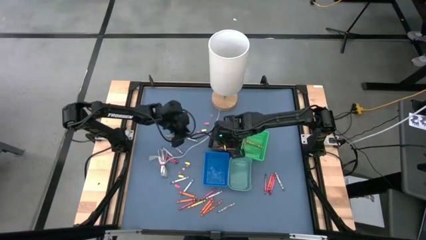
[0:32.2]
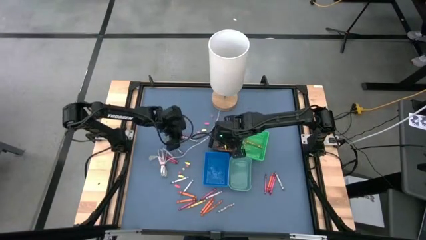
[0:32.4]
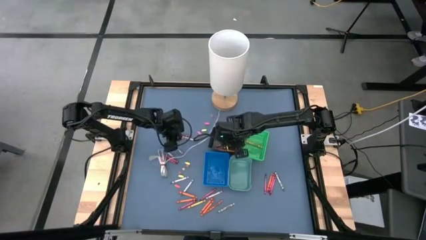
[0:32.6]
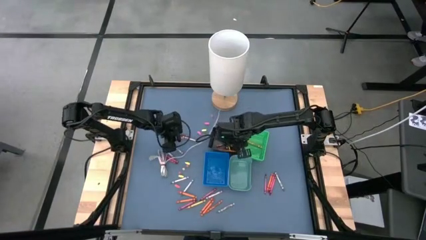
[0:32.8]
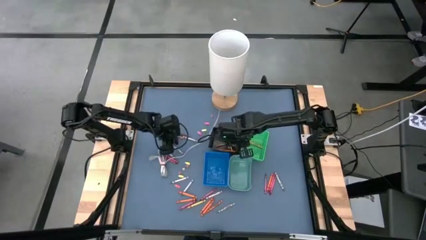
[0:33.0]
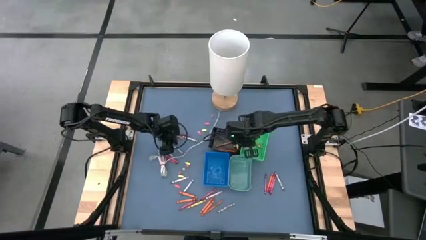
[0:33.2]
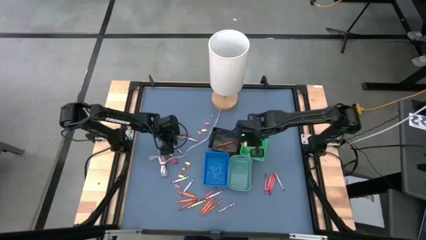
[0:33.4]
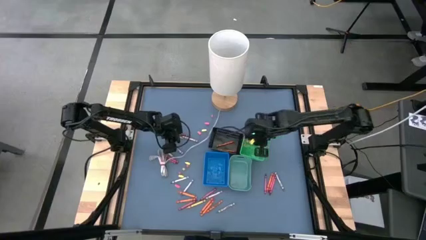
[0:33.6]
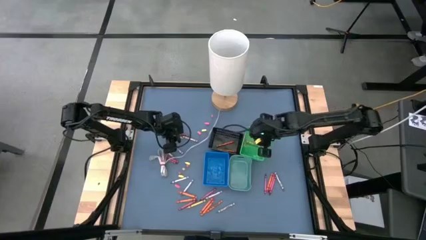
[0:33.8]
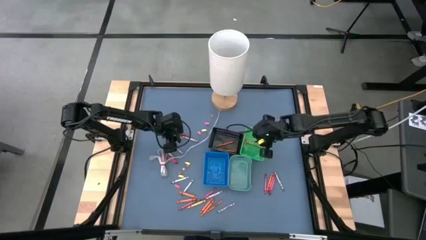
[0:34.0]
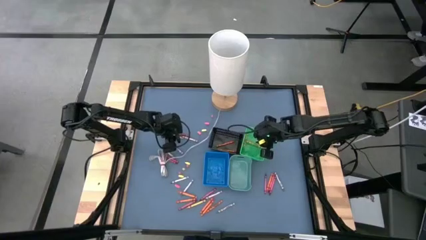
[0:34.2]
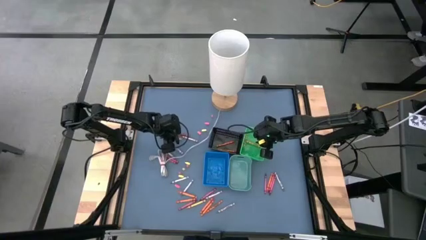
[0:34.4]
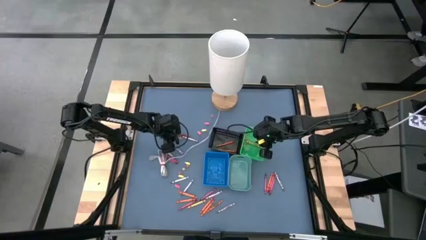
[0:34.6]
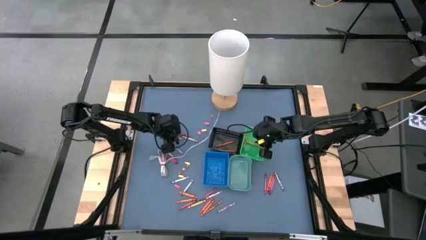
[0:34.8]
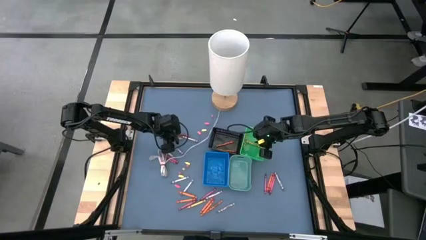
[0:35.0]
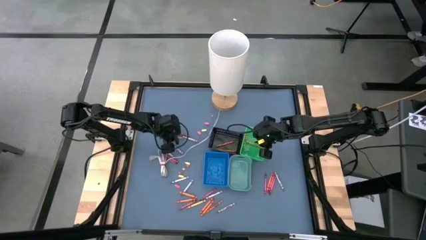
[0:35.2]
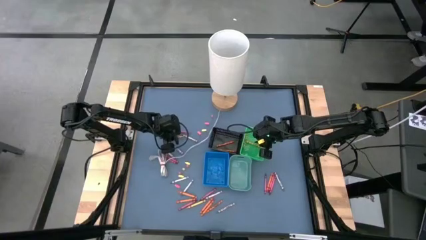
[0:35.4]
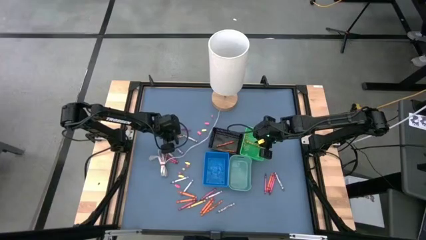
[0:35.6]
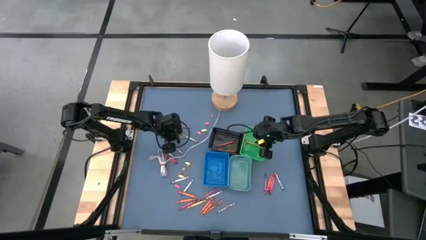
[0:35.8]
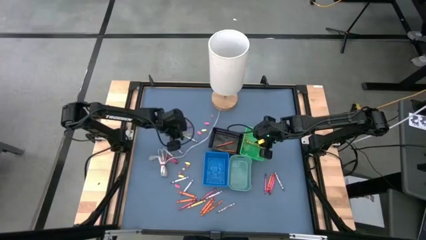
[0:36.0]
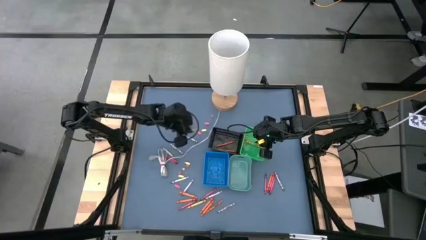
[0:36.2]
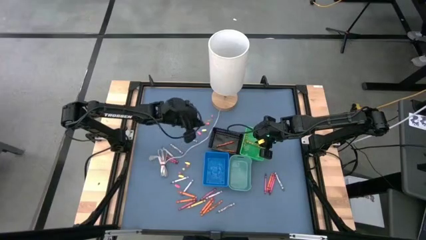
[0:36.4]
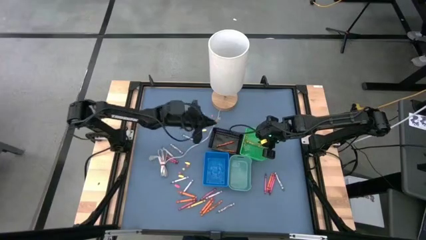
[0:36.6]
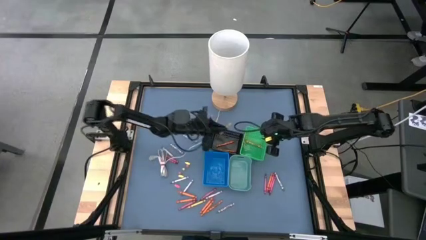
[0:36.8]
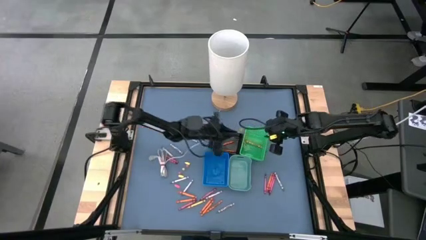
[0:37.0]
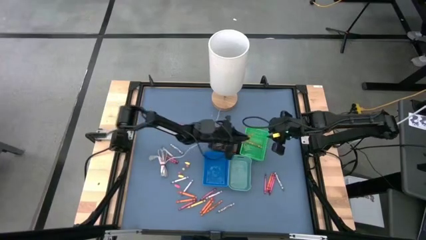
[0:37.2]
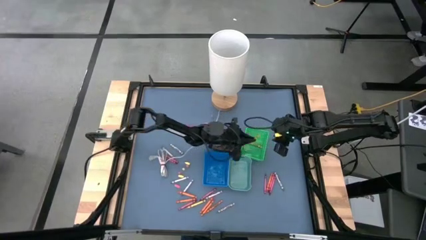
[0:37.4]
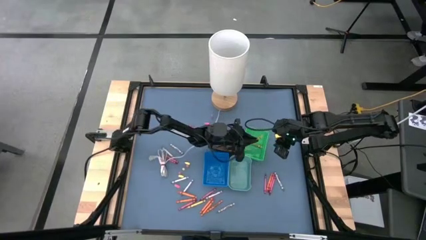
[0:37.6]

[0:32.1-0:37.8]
Task: Sort crayons
Put the yellow crayon into the green bin

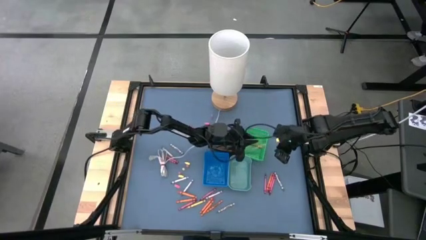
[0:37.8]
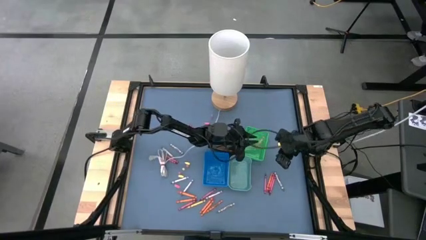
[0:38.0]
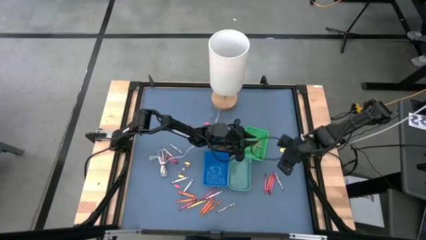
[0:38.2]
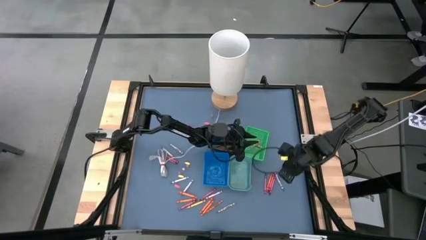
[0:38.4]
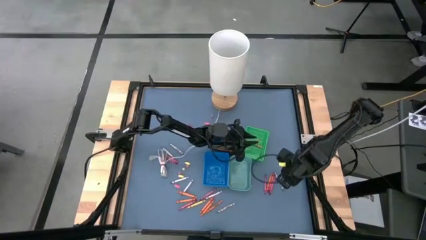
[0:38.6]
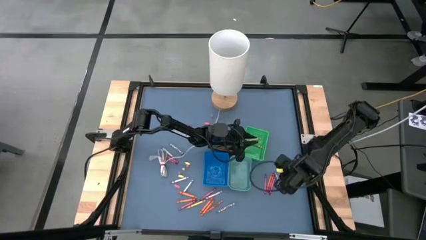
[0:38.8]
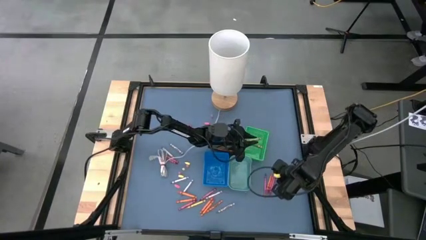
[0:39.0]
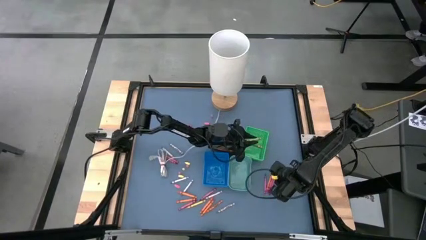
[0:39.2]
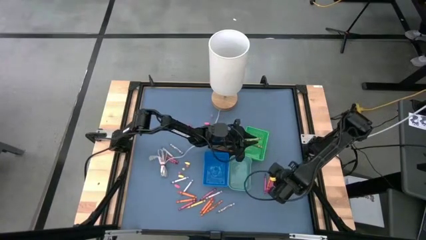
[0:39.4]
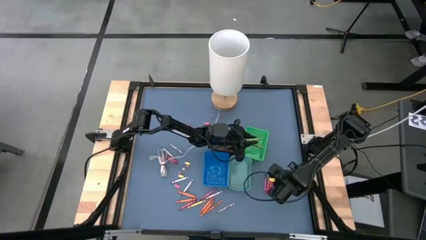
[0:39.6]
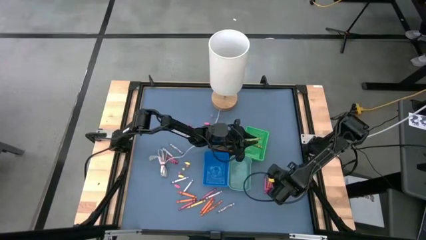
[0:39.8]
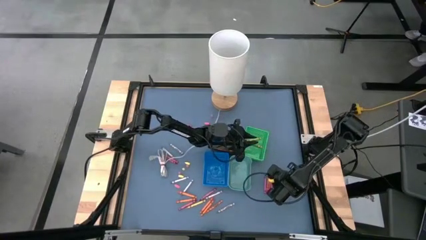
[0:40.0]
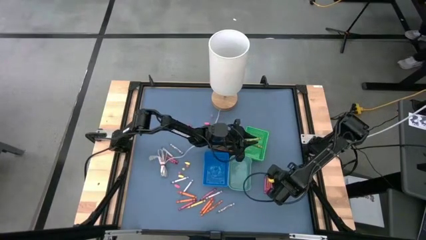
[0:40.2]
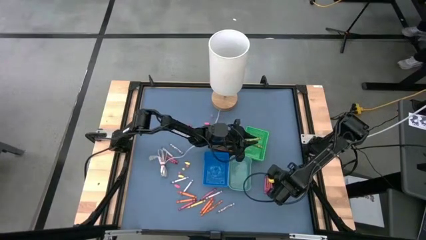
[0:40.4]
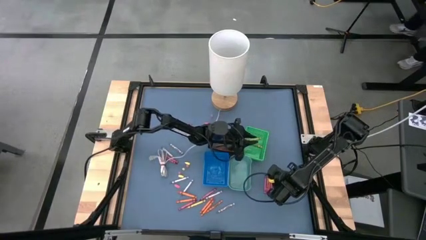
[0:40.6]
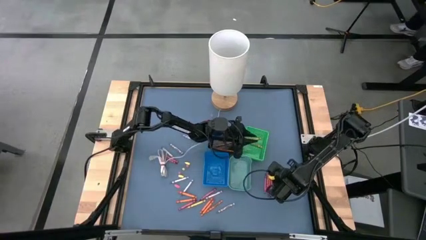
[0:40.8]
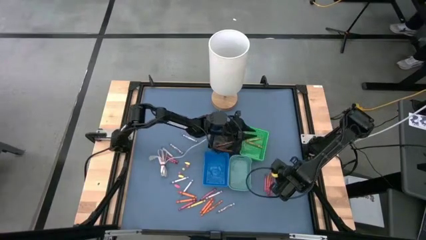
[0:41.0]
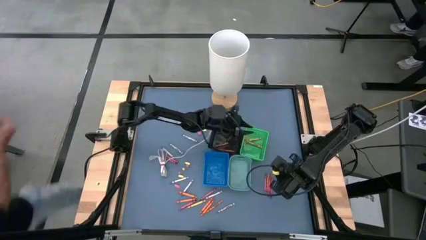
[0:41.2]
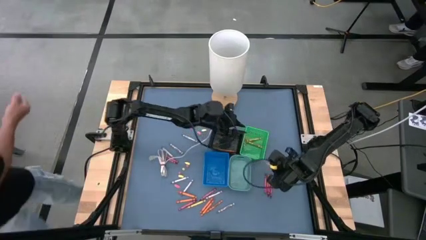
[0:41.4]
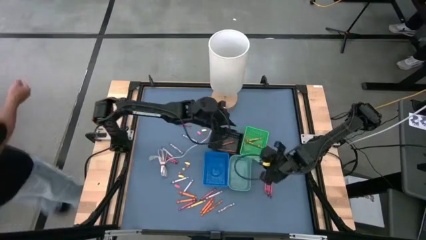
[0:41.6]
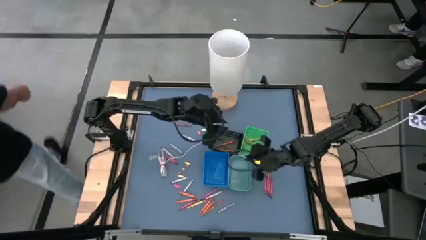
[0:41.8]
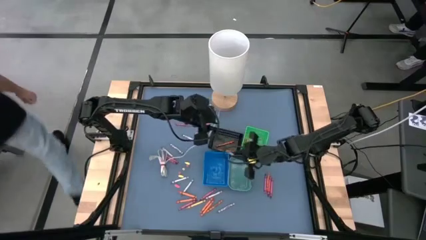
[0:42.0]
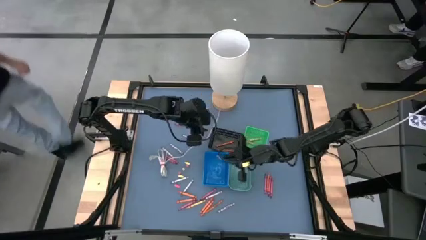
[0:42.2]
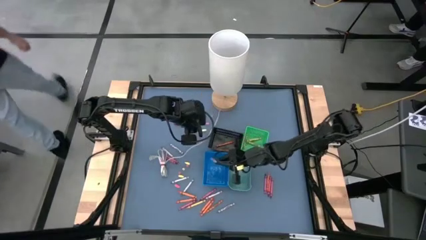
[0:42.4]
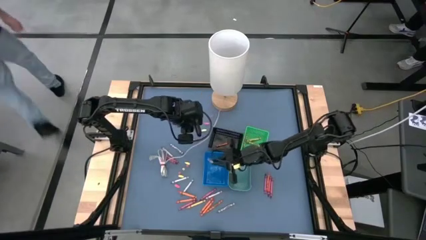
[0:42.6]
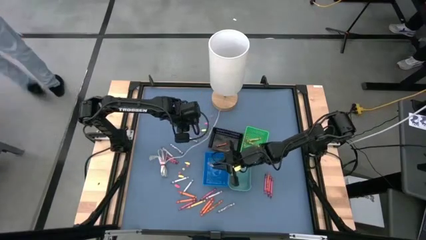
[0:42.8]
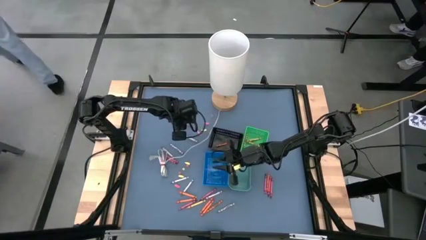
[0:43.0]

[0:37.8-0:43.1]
Put the gray crayon into the blue bin

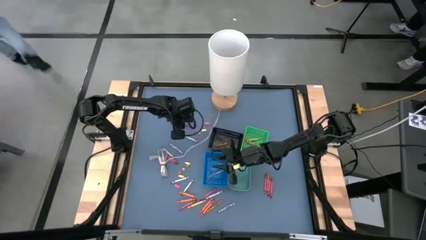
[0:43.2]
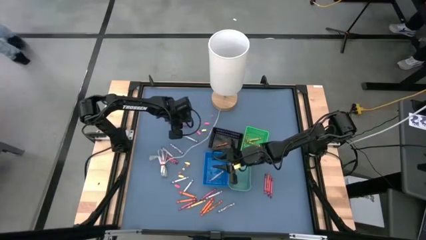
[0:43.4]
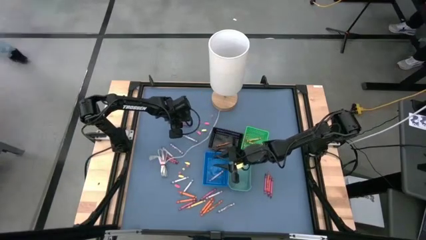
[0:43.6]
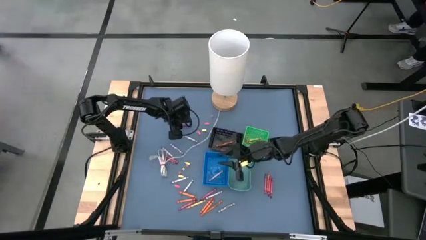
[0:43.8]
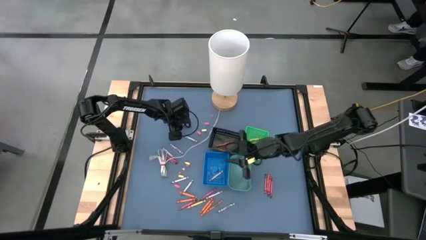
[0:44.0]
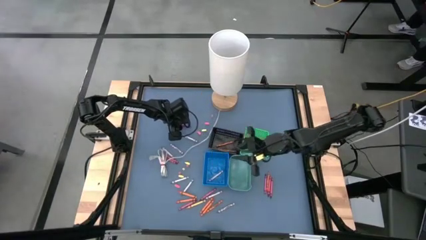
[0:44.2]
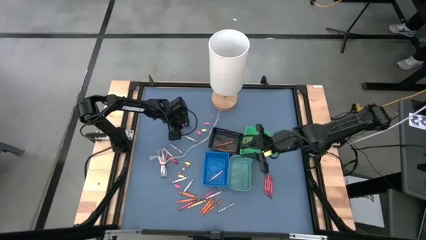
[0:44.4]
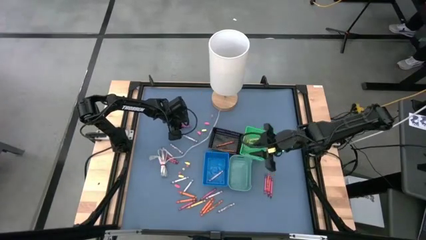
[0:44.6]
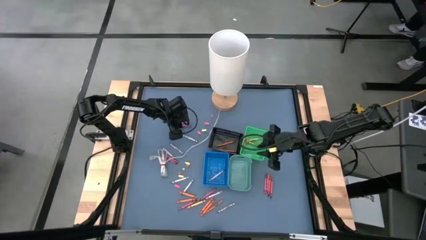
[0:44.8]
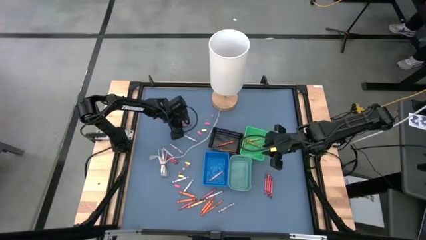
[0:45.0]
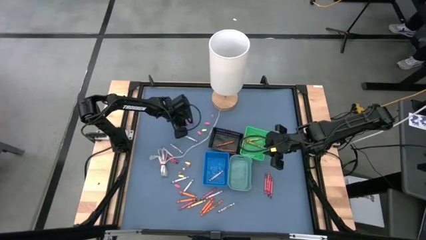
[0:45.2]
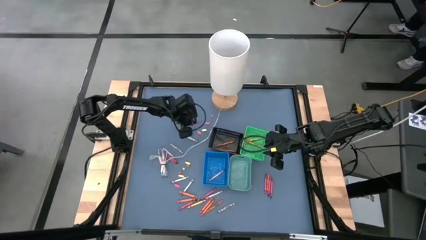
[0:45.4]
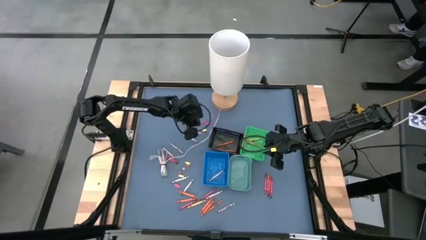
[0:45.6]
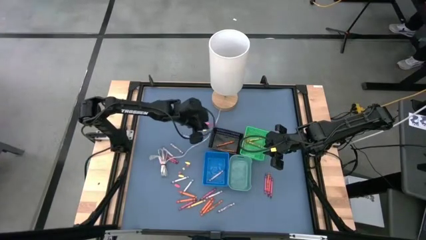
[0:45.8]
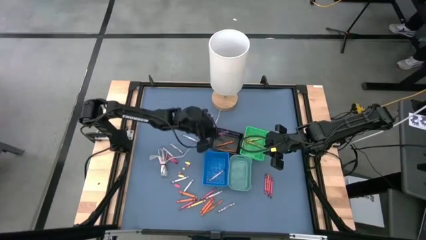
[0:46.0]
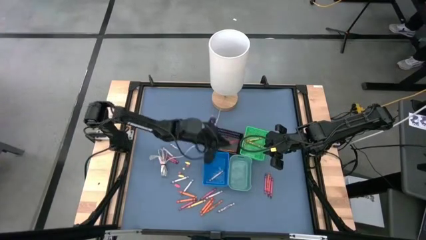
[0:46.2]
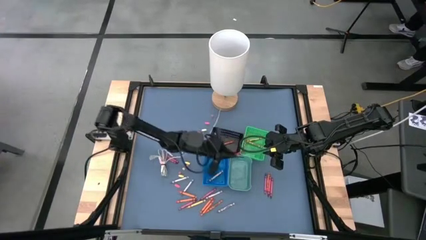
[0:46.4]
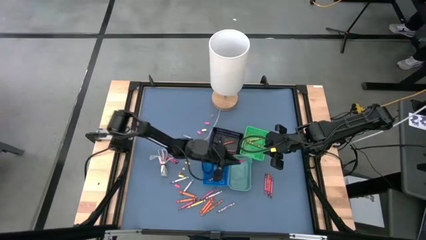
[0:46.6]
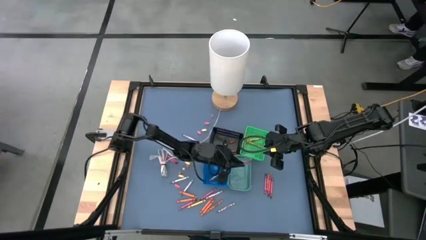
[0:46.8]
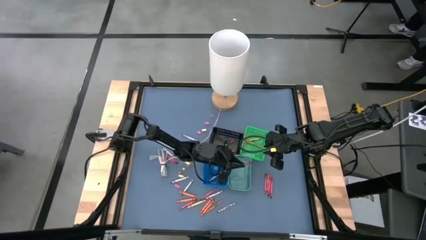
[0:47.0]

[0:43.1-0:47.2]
Put the red crayon into the light green bin

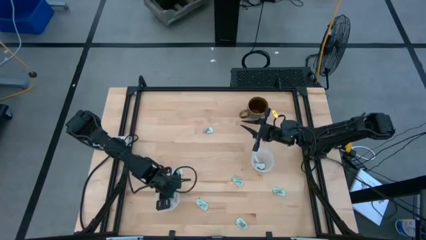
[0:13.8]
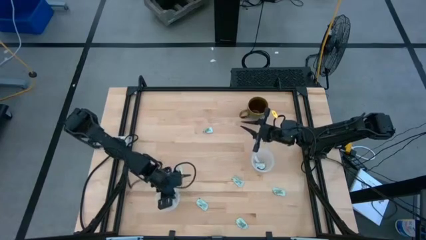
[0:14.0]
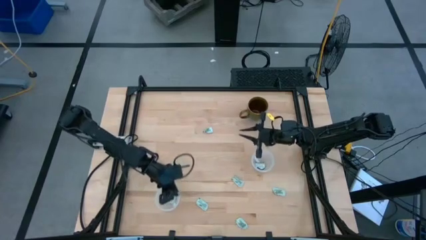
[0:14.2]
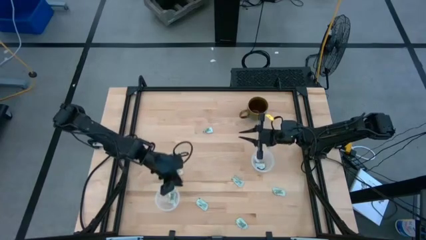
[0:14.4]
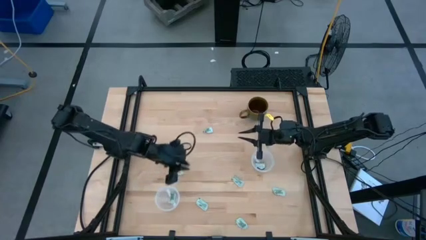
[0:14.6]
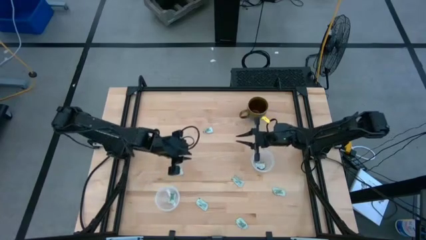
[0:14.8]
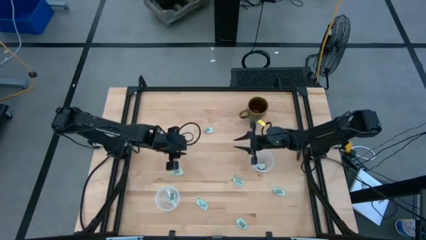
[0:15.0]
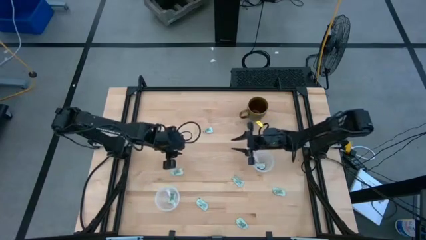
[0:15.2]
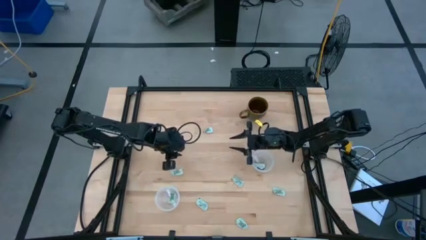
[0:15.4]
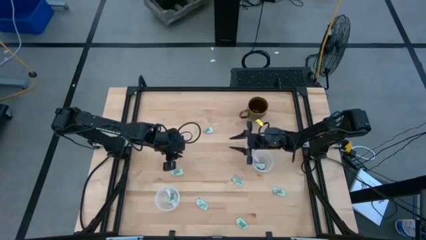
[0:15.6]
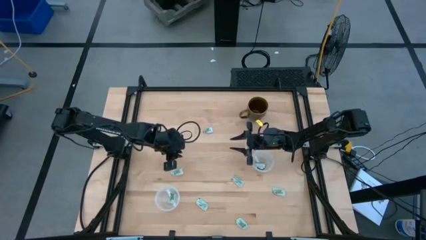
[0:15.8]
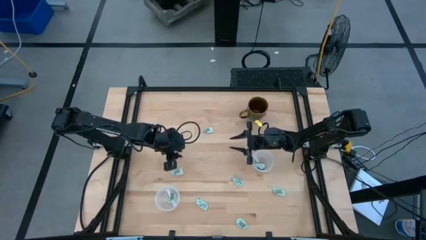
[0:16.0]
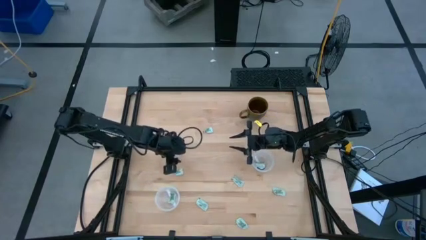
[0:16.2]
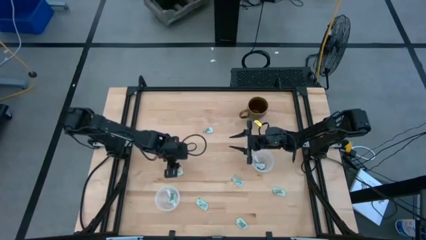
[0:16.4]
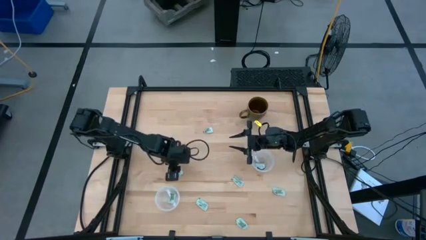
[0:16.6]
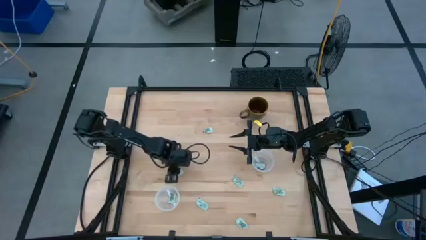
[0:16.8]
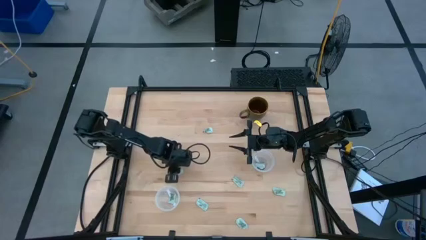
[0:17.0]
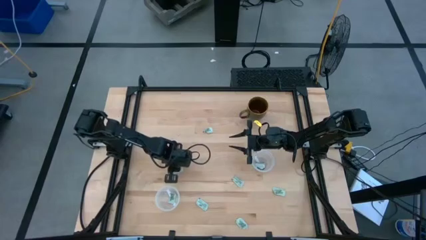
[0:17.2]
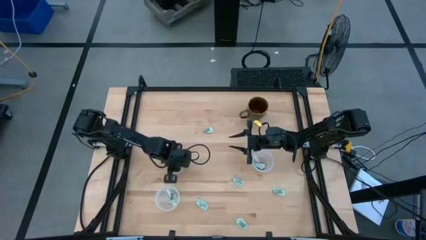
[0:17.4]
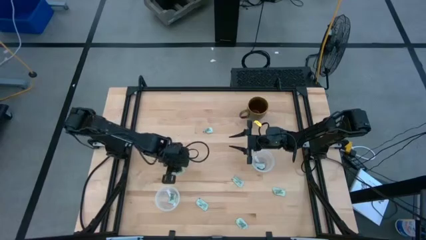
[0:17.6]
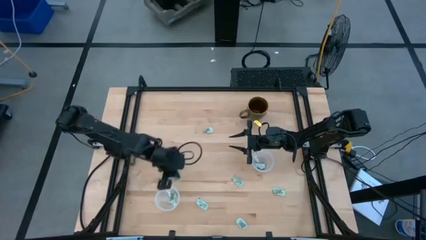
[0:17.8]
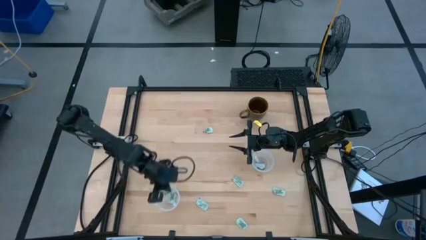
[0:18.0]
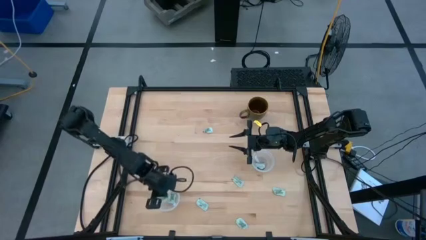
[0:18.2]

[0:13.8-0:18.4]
Task: Pick and place Stevia / Truvia into bins
Put the stevia packet into the bottom transparent container
